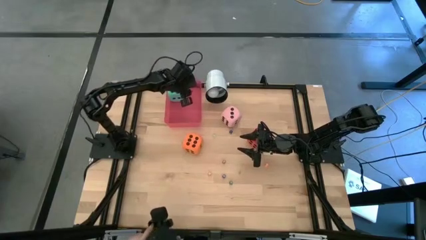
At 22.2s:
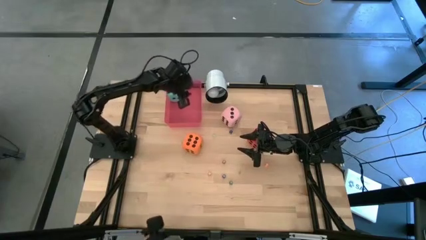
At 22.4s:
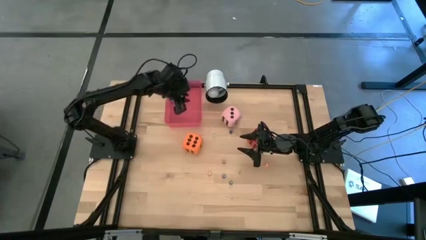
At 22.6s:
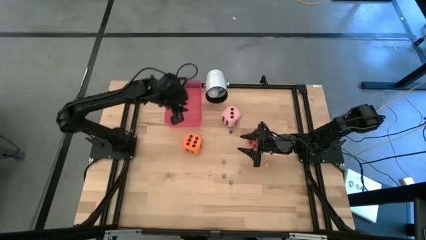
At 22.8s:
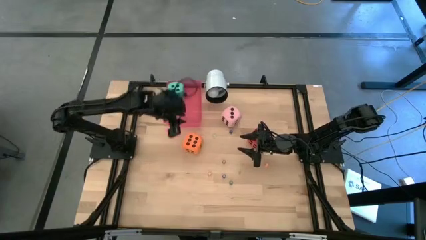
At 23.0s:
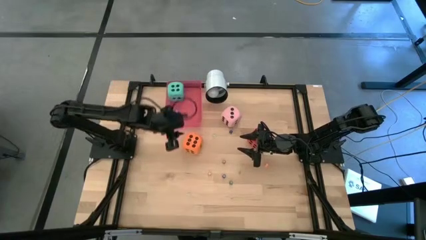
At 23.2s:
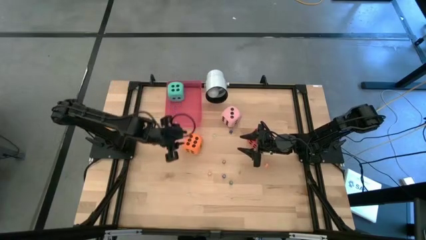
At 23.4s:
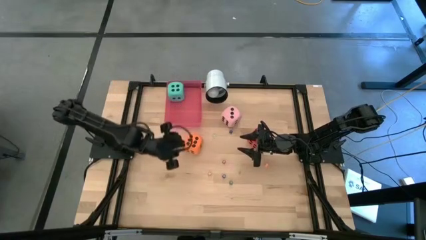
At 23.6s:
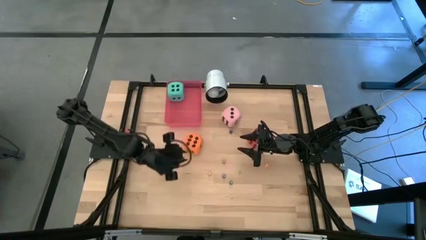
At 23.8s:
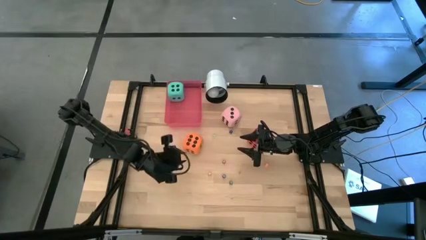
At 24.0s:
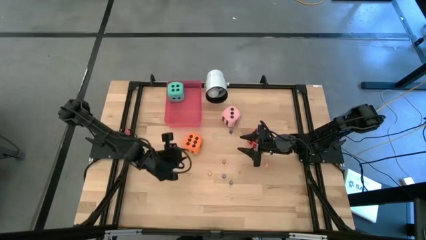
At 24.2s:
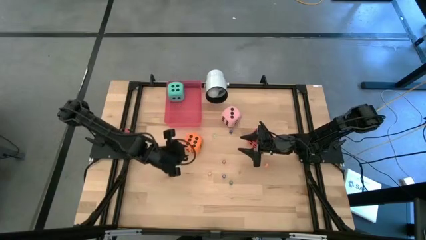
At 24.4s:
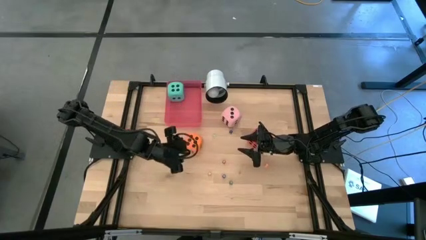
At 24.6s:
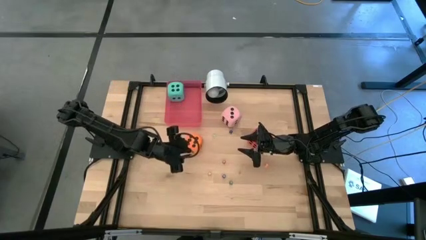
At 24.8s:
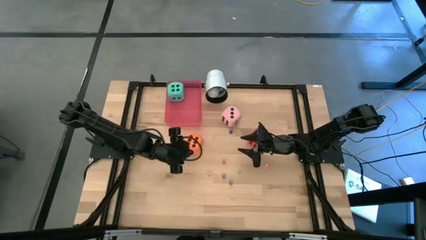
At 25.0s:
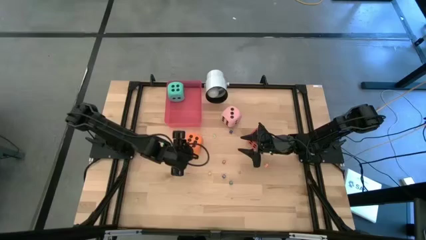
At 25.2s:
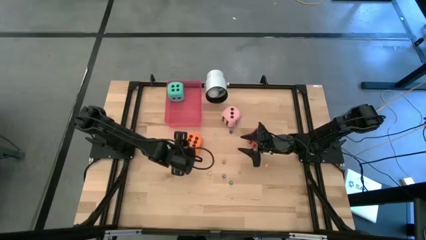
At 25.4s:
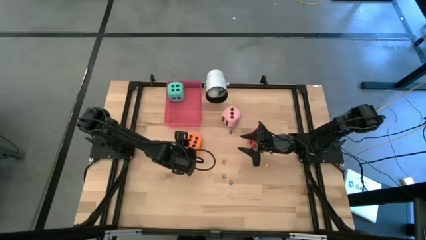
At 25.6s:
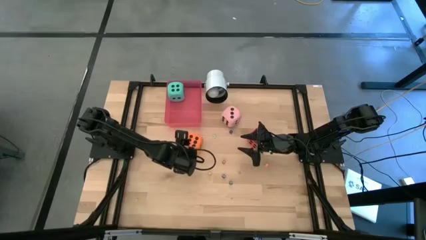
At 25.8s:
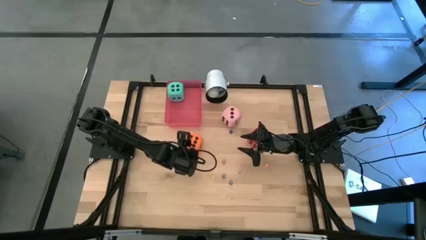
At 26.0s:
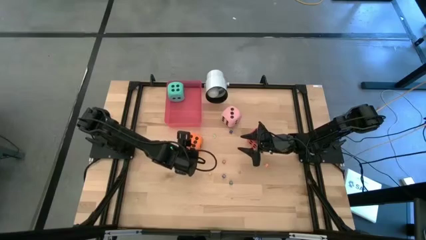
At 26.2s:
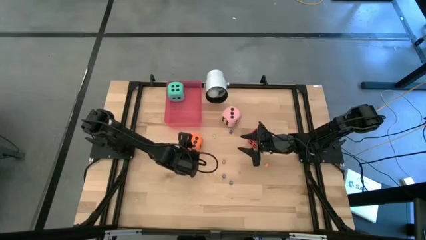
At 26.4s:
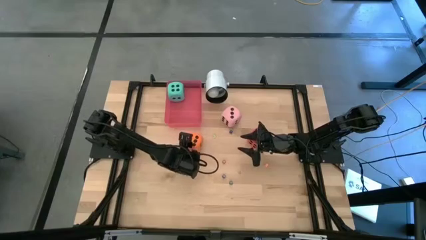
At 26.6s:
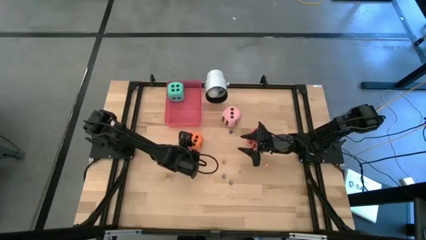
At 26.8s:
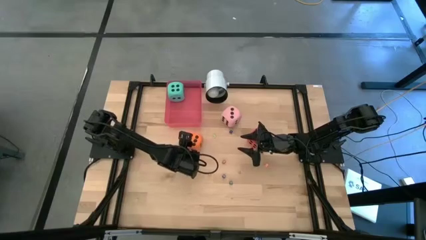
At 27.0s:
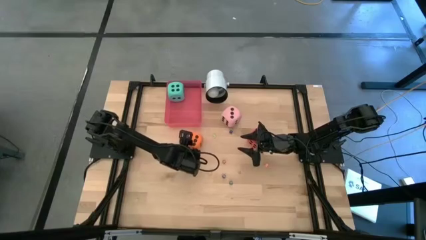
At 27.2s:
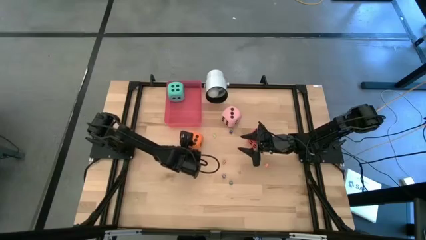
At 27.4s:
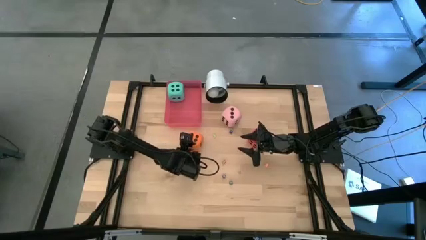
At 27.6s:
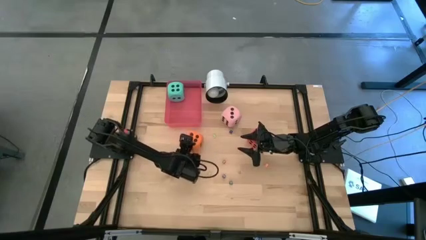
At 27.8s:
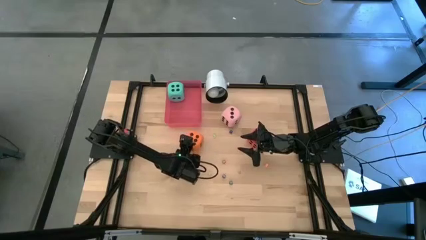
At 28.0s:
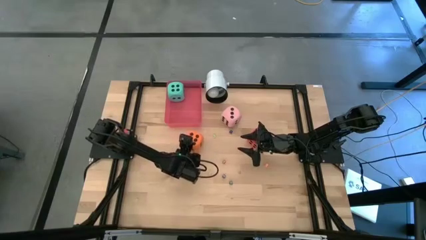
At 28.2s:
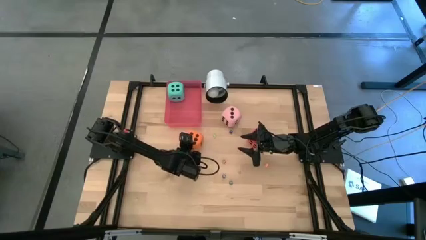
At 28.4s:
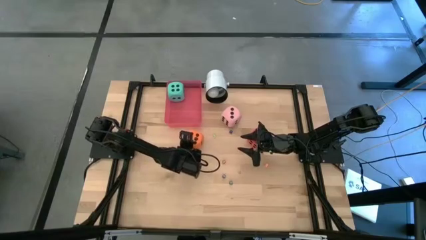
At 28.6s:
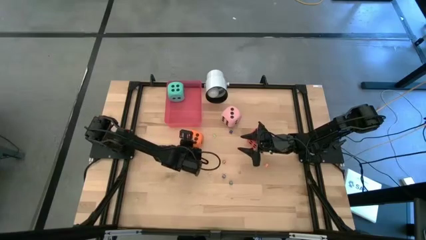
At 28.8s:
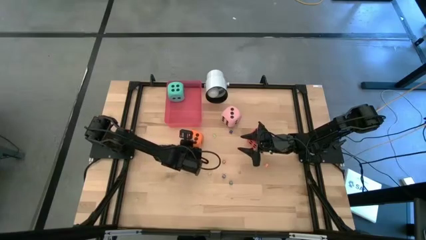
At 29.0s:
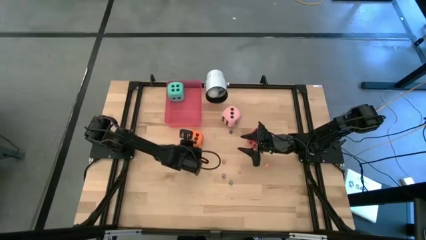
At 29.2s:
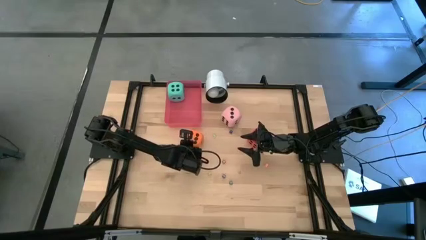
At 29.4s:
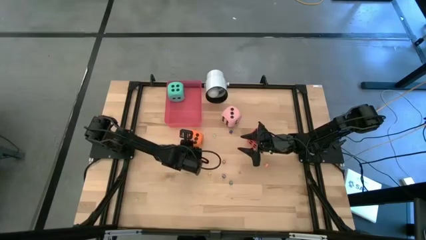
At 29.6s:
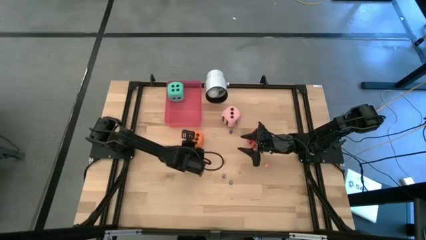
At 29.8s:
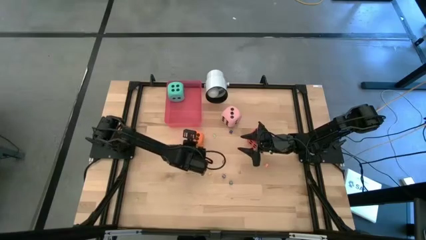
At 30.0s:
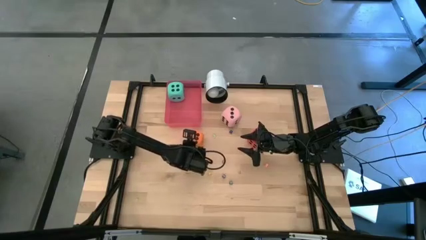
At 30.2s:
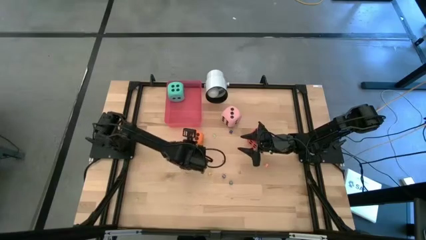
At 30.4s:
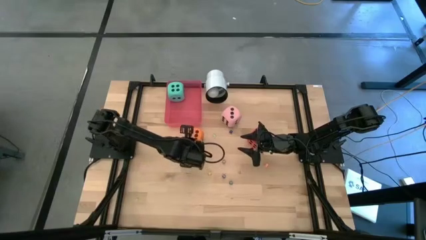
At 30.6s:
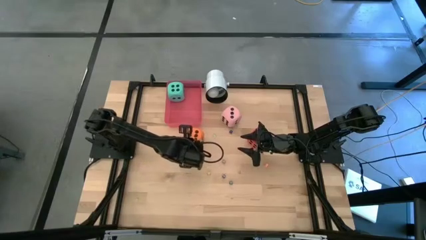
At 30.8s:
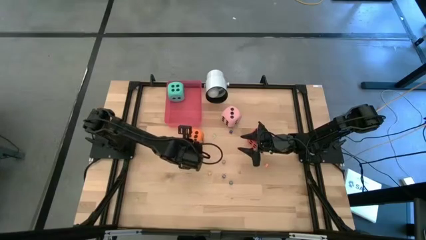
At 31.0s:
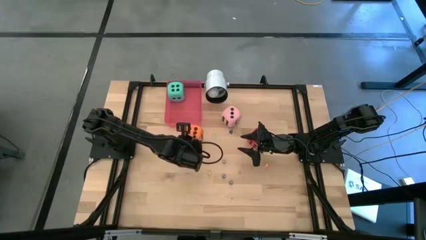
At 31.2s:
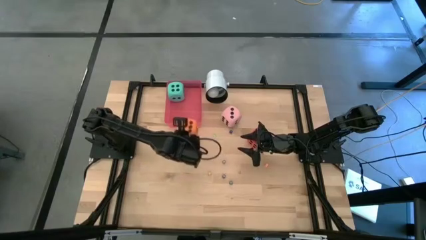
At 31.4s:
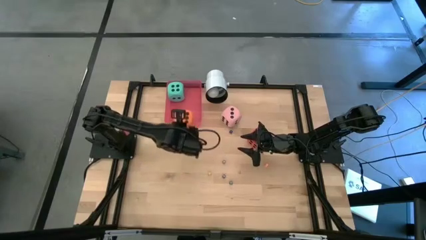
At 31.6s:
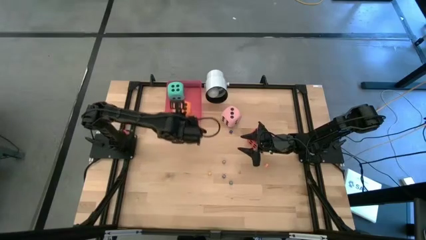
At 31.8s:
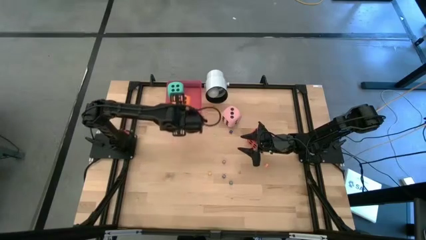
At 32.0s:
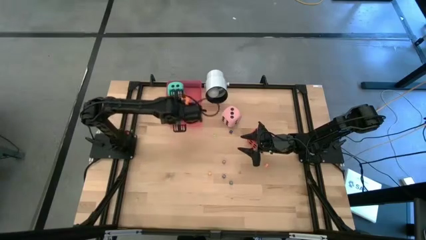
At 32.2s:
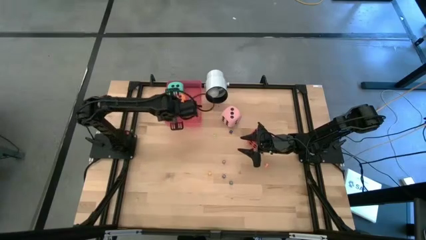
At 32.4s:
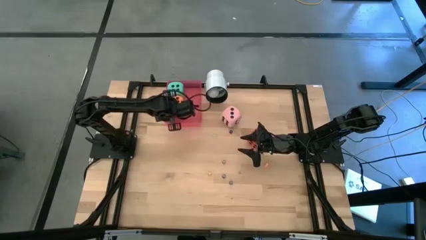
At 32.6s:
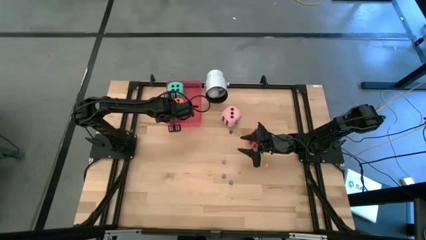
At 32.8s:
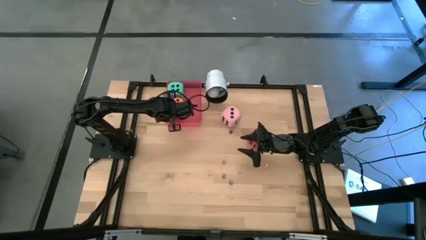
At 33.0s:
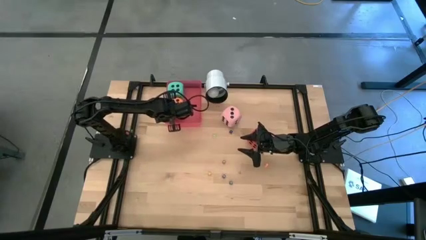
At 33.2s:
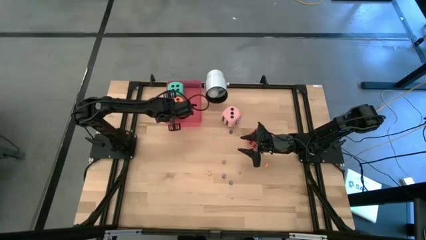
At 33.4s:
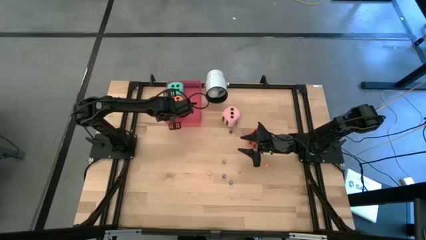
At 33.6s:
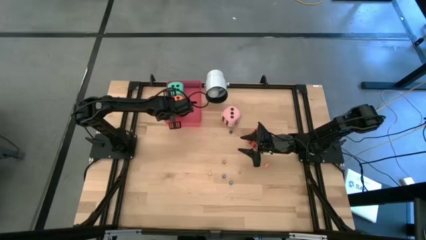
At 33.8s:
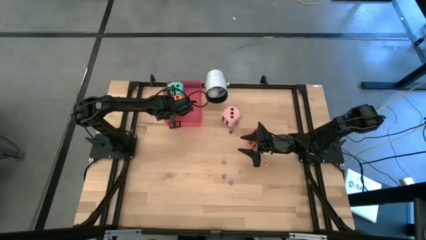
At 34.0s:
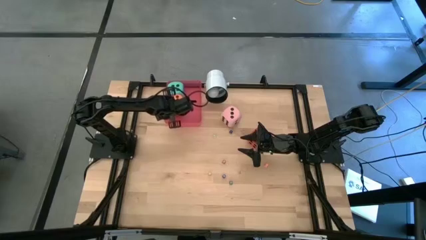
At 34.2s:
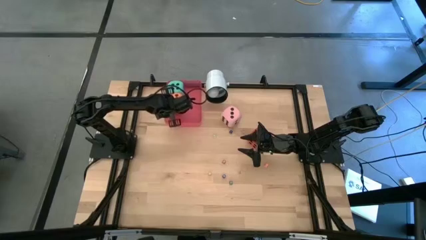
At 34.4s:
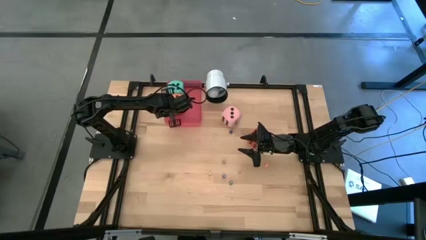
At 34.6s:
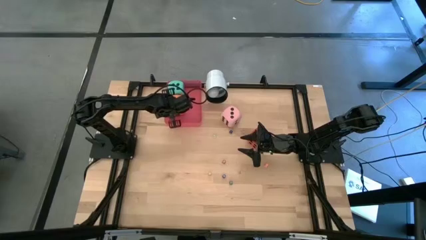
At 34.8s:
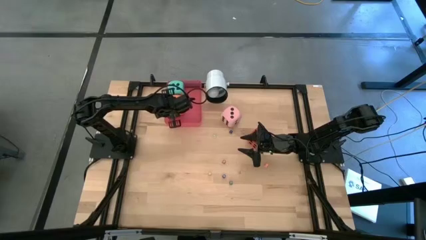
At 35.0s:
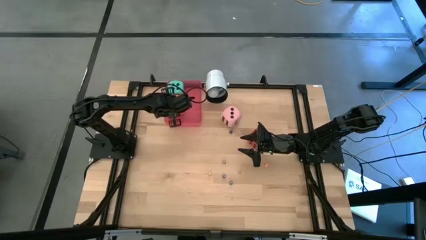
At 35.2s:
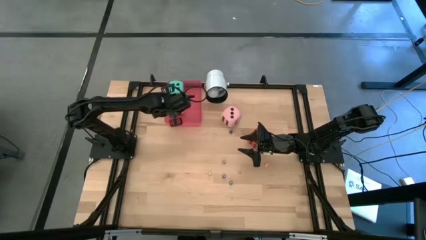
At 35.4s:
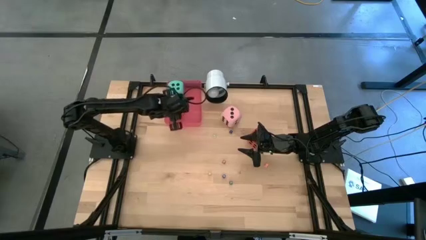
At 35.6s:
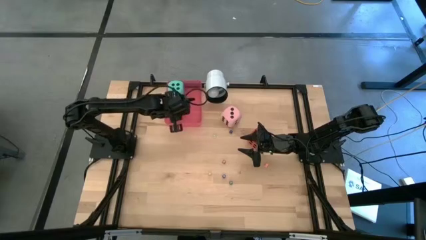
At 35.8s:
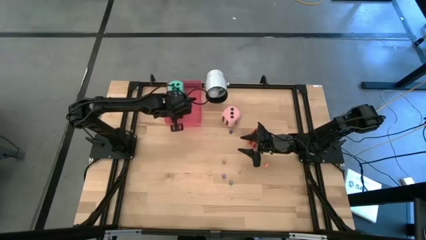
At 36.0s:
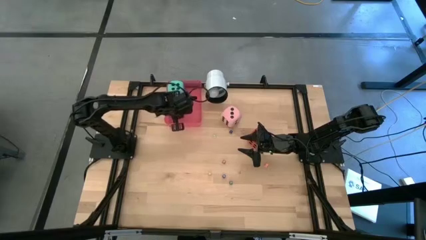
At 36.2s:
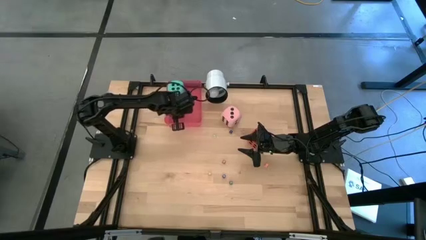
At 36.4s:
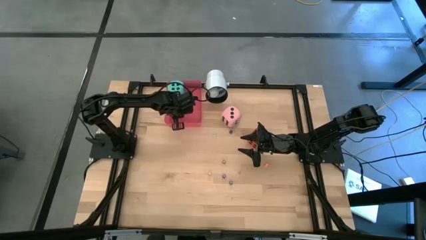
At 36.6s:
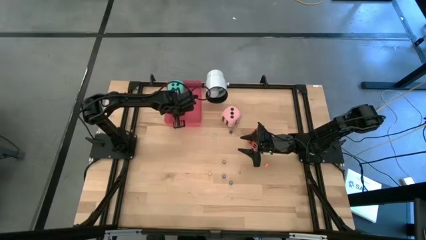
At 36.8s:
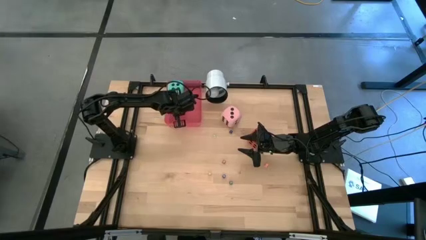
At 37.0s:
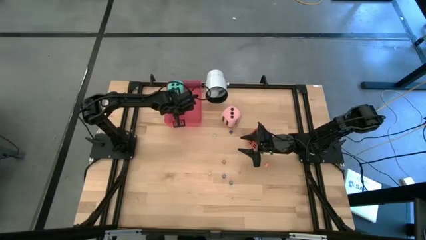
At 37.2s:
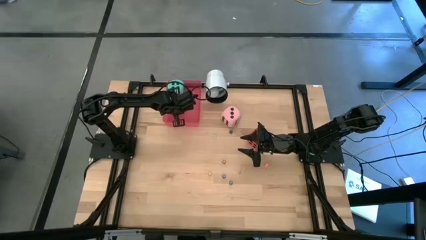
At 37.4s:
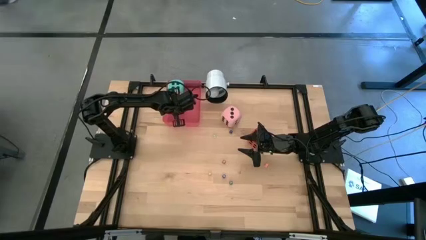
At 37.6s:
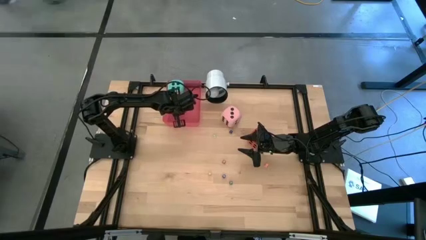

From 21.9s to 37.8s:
Task: Pick & Place Dice
Put the big orange dice into the red bin
